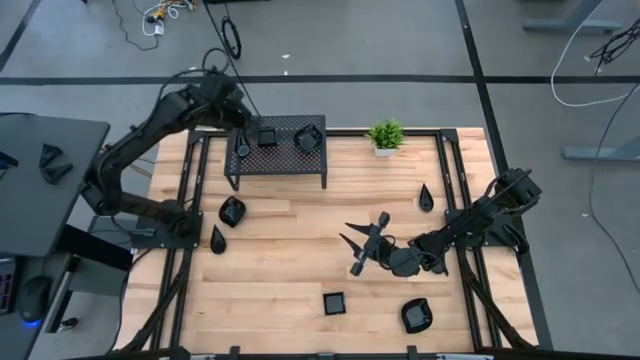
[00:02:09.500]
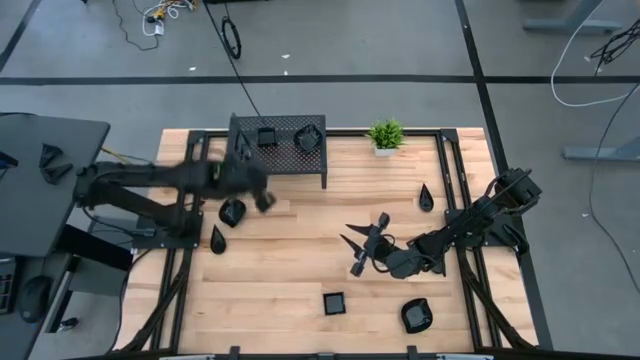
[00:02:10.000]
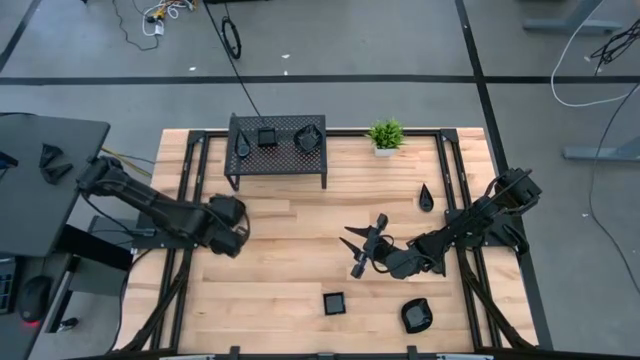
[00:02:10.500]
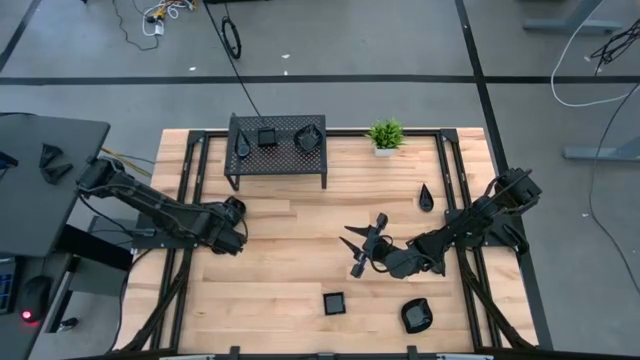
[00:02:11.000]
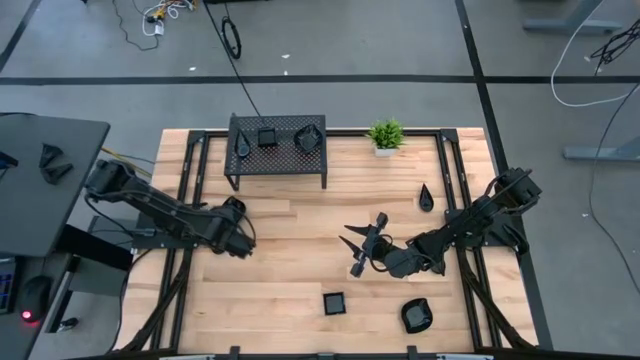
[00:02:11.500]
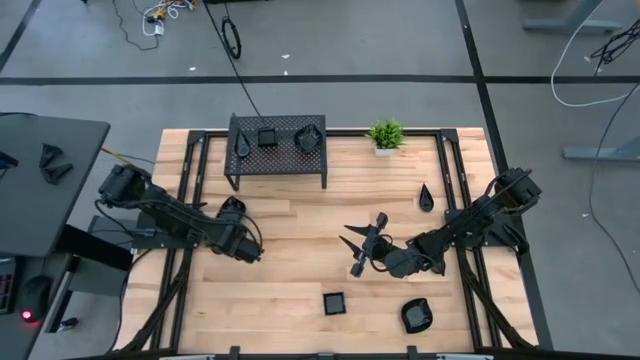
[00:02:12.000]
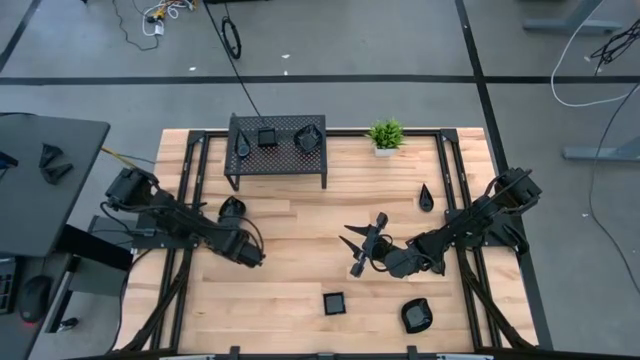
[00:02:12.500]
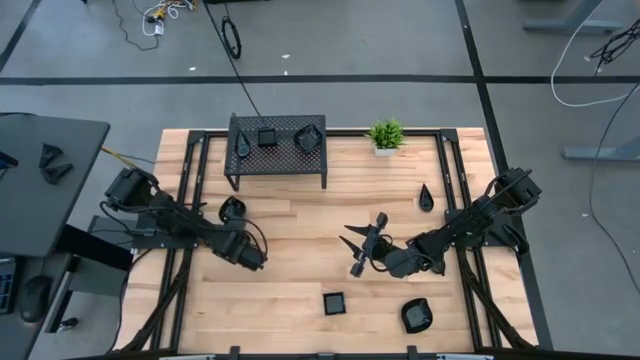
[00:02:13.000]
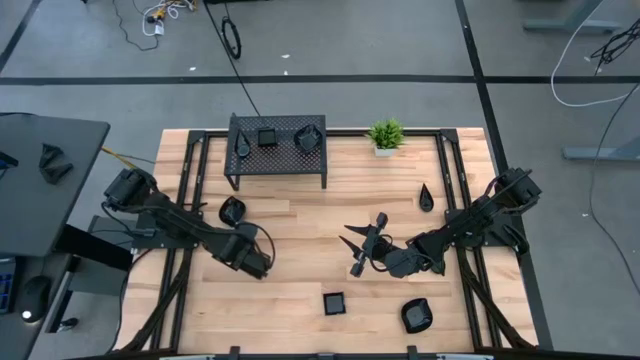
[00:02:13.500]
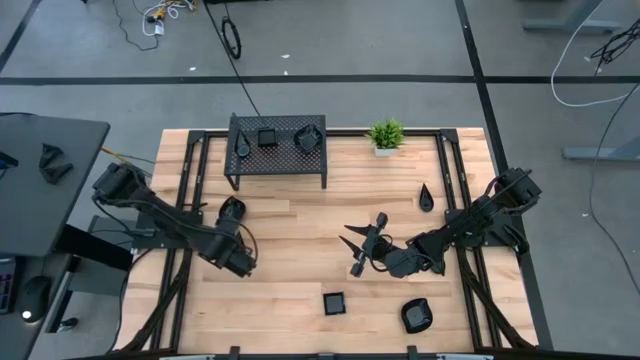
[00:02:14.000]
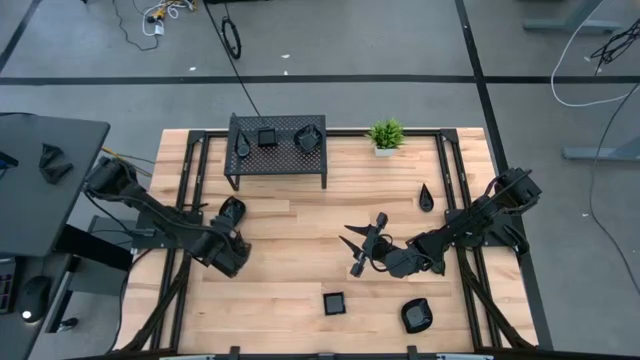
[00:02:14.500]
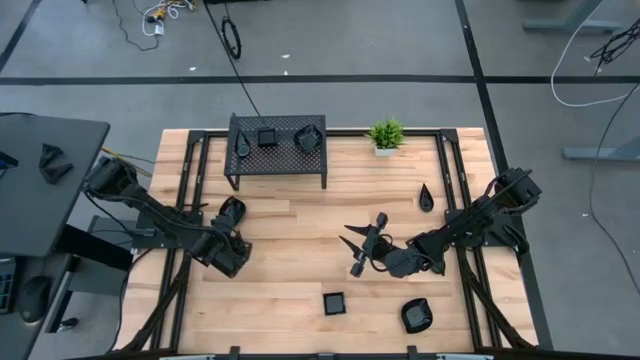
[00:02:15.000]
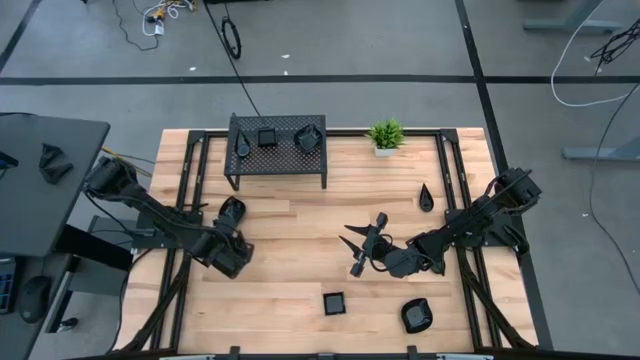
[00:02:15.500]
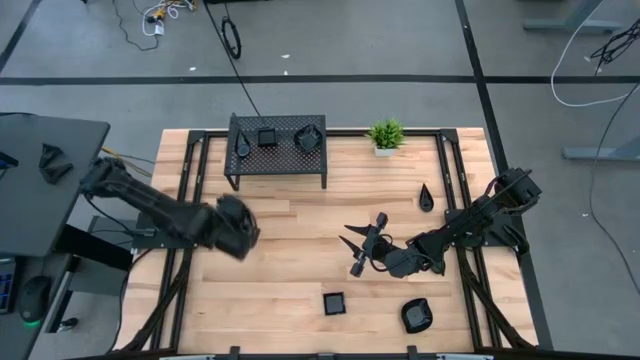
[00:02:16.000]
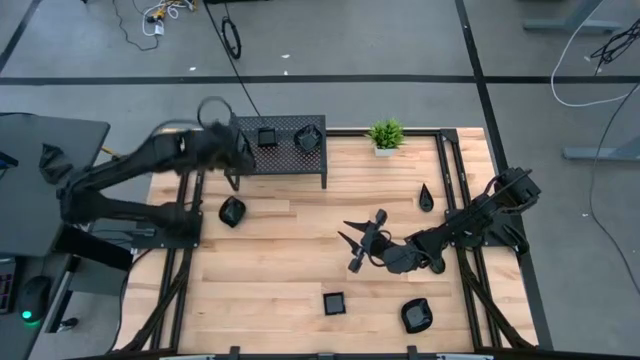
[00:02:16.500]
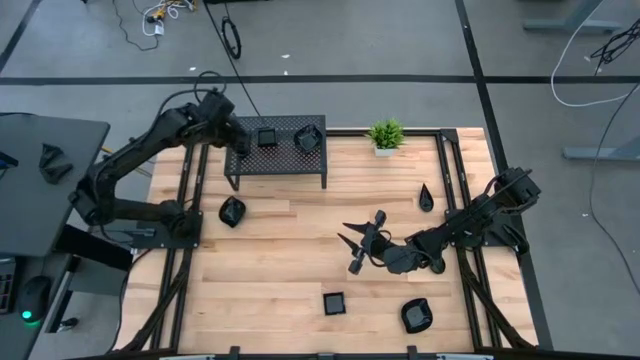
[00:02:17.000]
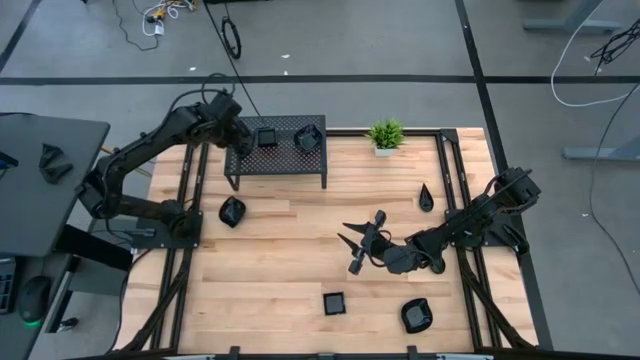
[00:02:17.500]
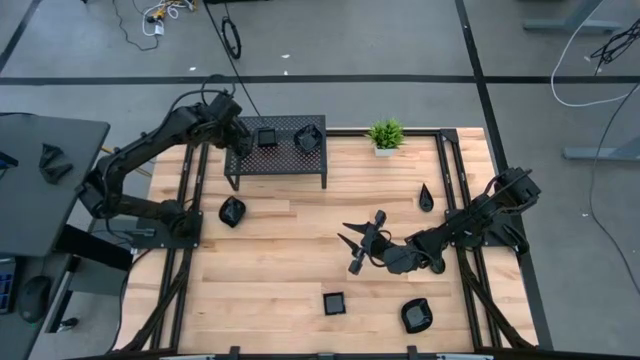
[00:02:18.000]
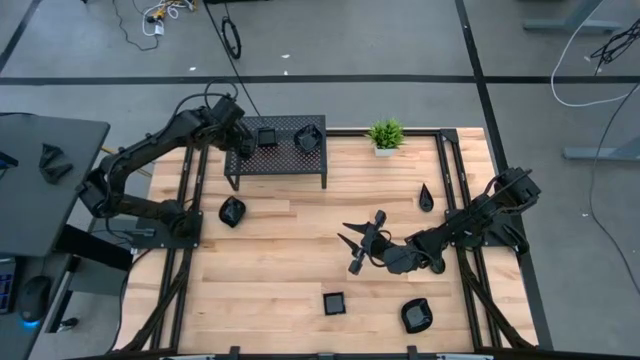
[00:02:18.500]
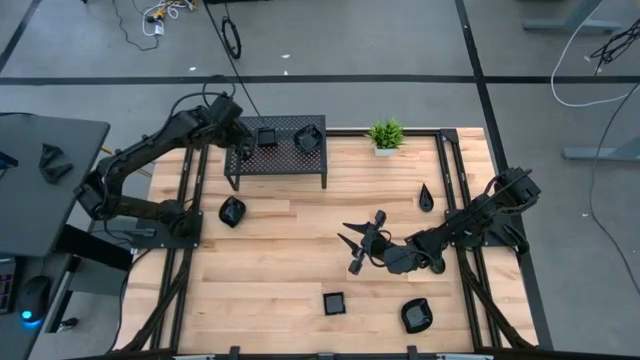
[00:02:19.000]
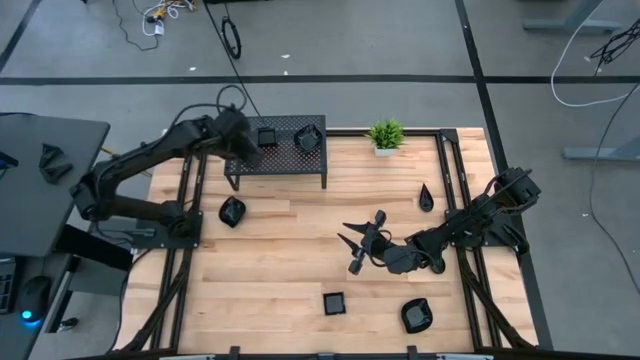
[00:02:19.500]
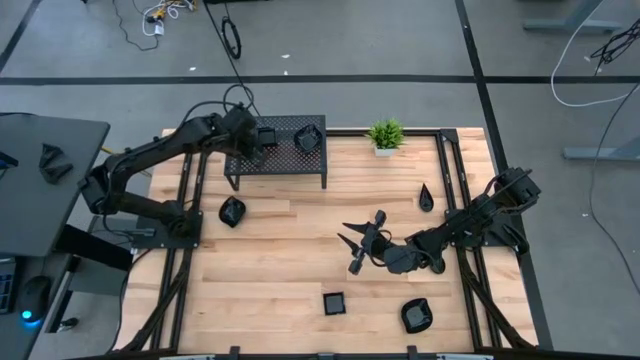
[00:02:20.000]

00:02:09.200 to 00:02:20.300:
Task: Pick & Place Mini shaped plates
Stack the black drop shaped plate on top of the black drop shaped plates on the shelf

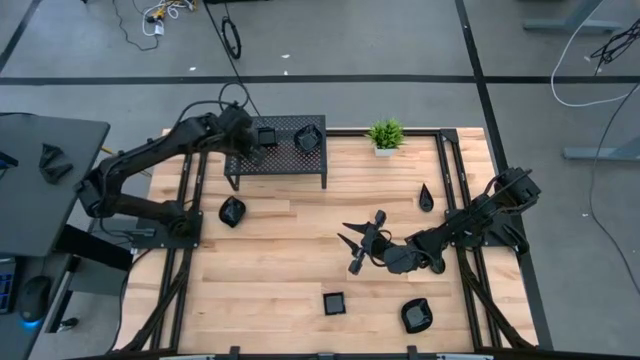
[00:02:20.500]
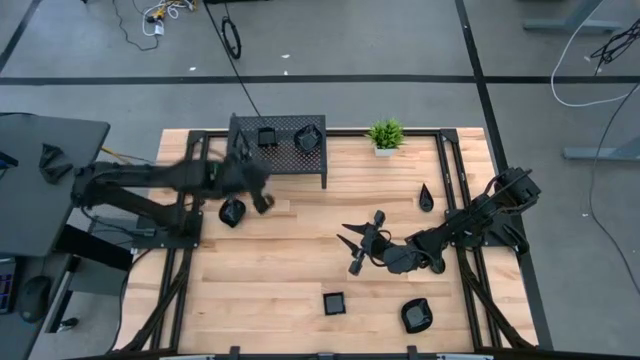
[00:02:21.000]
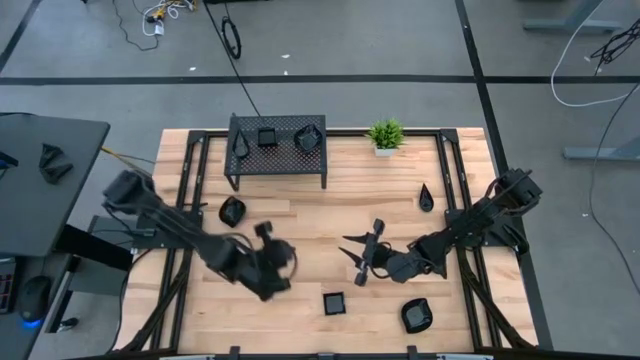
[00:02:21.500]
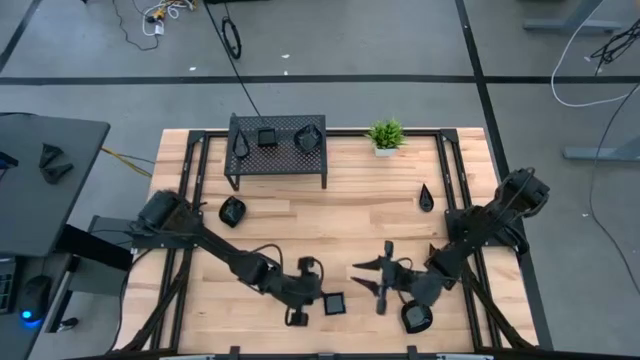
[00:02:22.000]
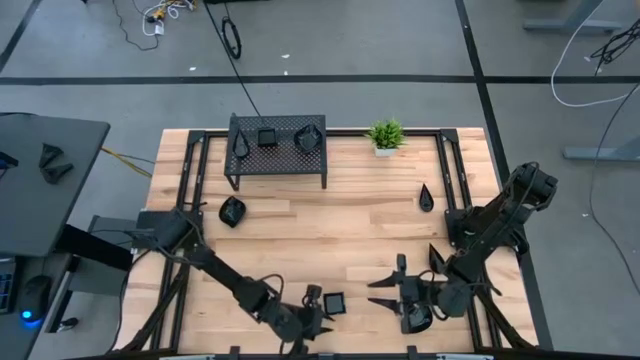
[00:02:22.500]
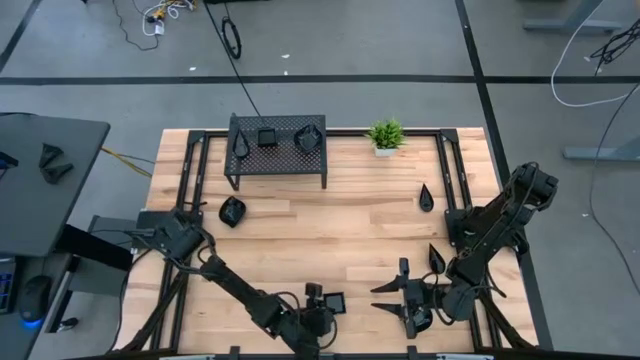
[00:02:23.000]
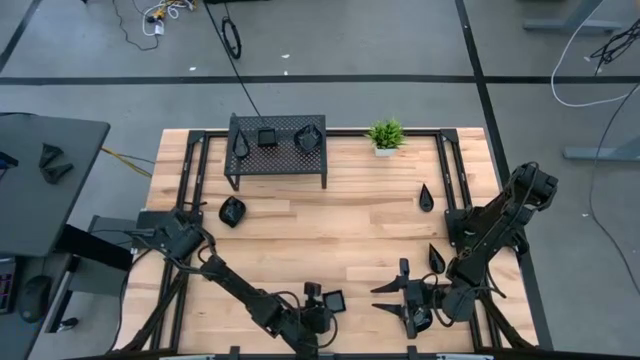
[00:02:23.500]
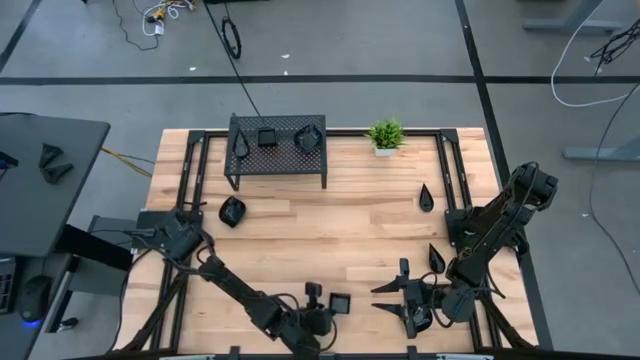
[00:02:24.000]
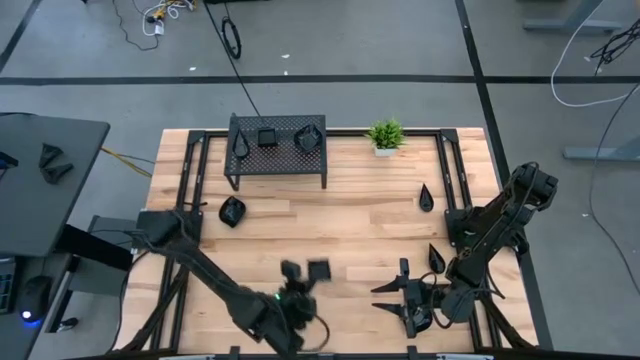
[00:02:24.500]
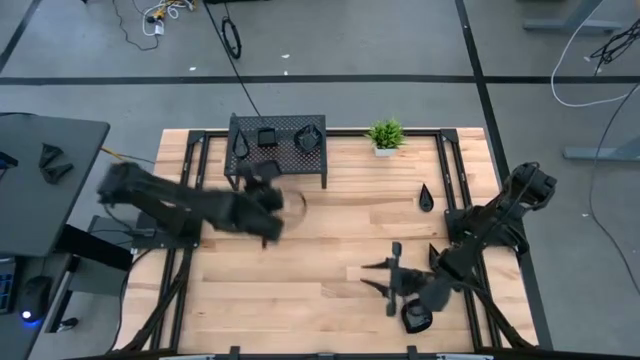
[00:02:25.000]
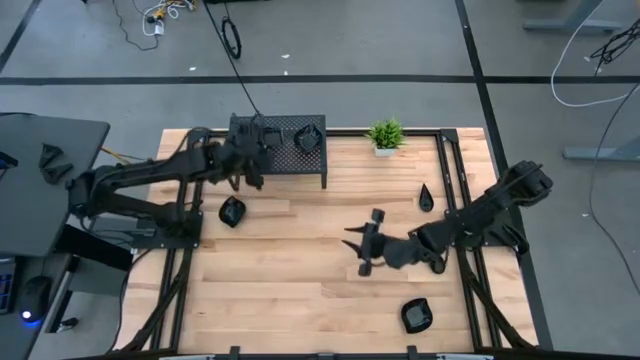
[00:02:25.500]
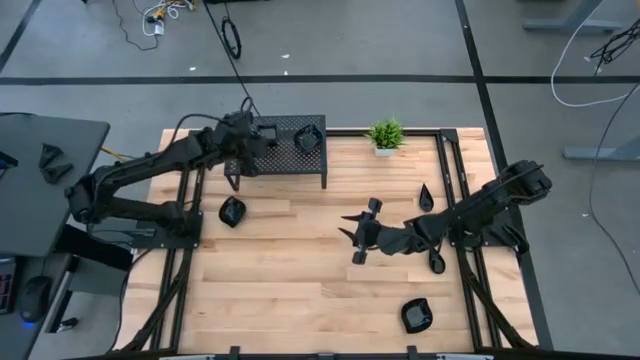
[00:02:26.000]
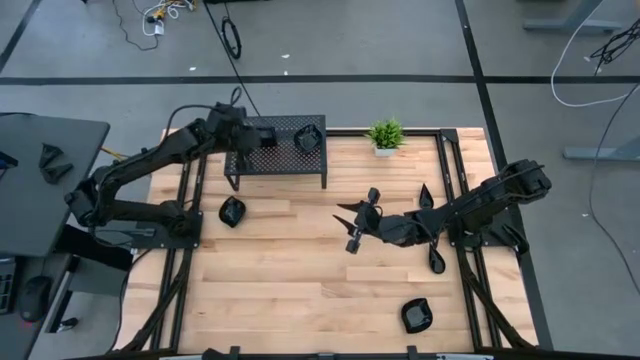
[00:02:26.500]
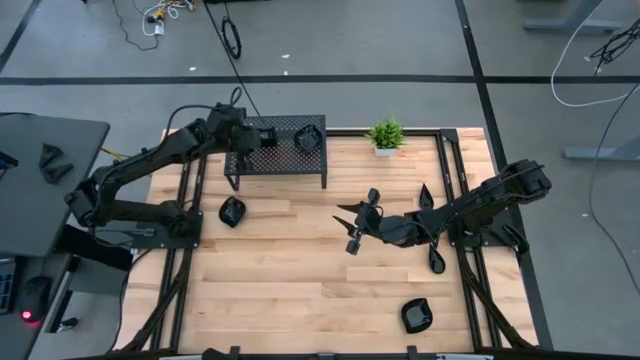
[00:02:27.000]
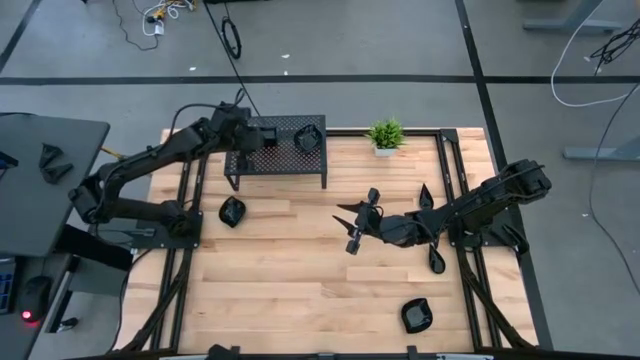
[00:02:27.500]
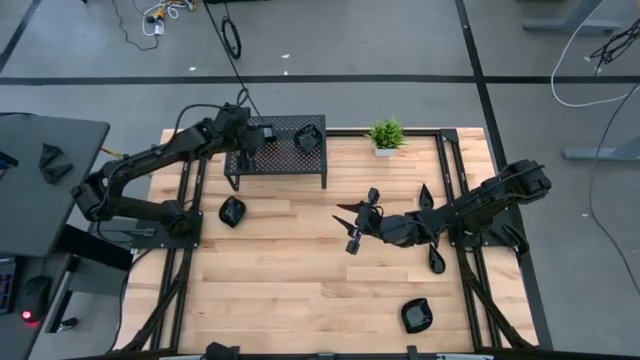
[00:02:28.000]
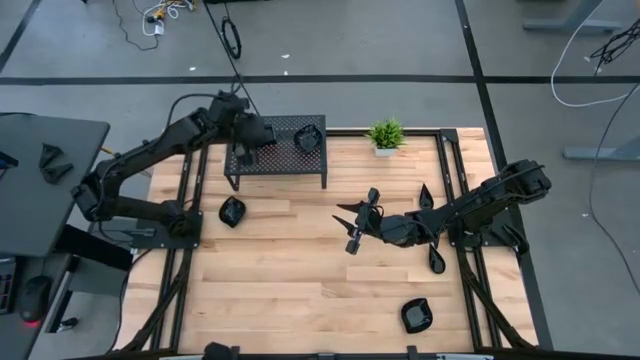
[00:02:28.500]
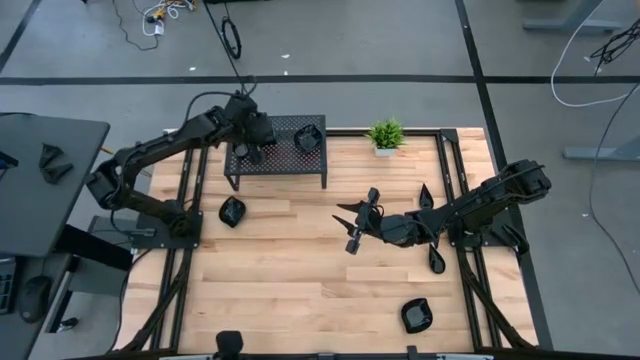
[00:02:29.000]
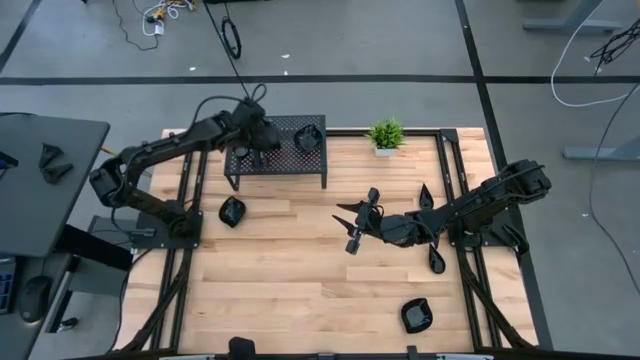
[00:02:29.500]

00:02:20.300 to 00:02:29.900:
Stack the black square plate on top of the black square plates on the shelf
